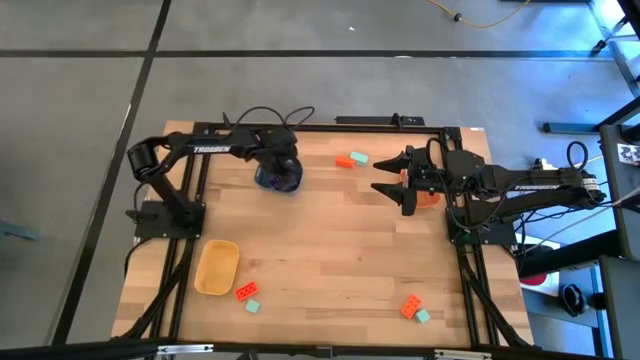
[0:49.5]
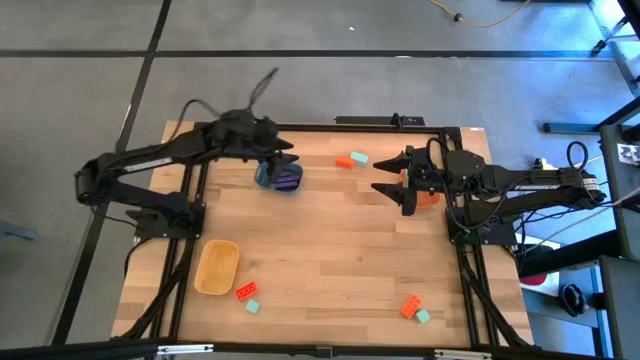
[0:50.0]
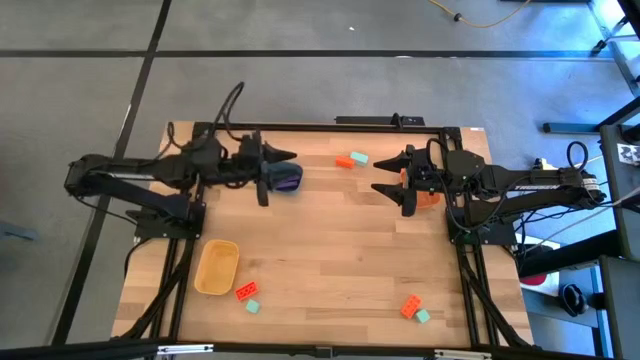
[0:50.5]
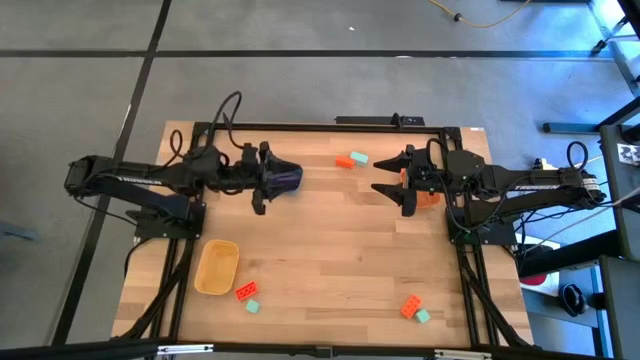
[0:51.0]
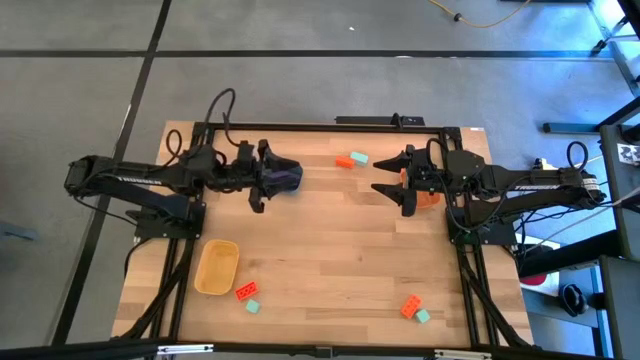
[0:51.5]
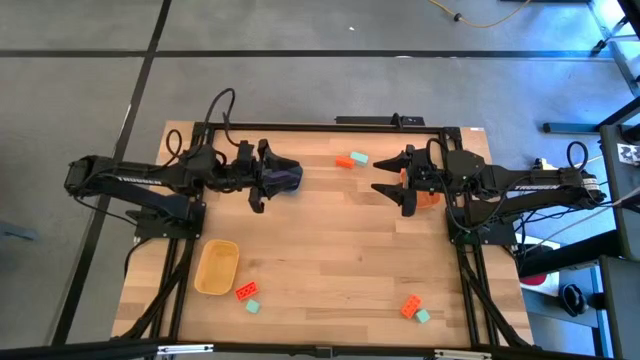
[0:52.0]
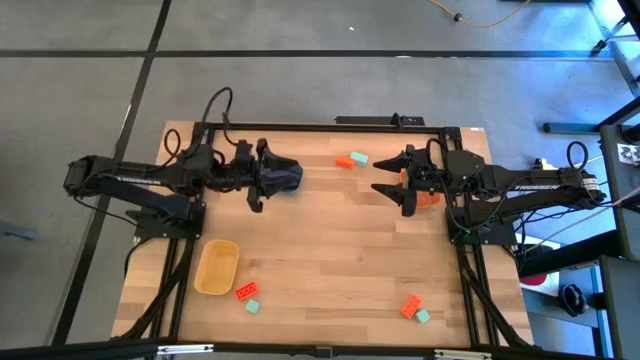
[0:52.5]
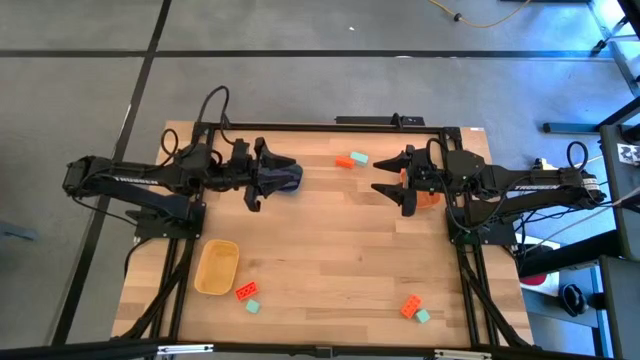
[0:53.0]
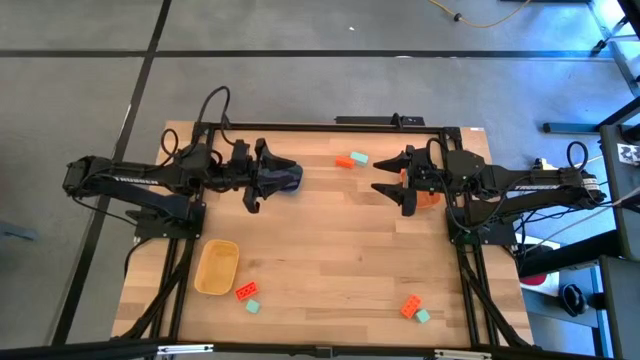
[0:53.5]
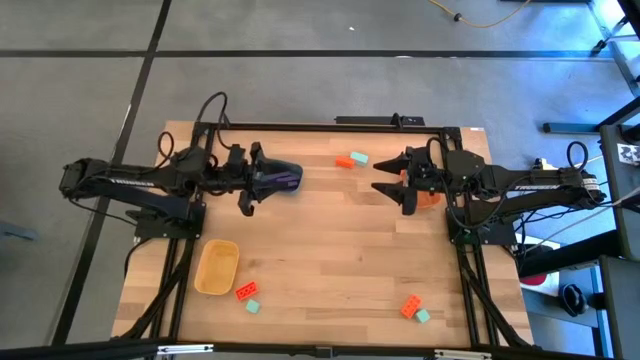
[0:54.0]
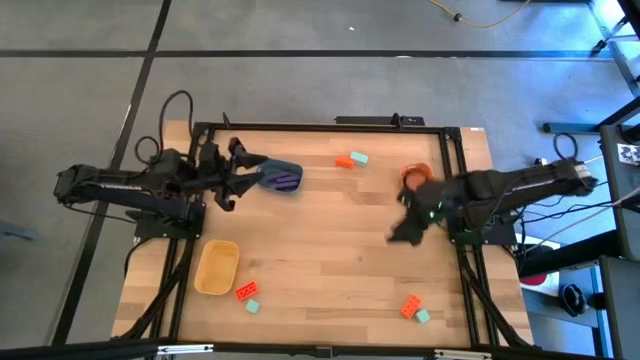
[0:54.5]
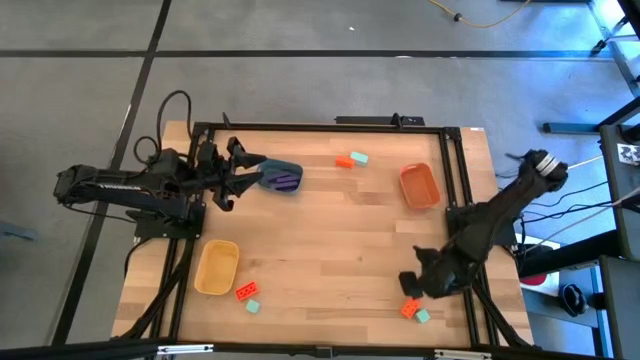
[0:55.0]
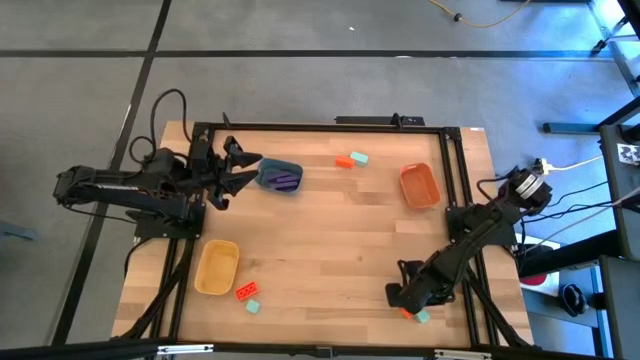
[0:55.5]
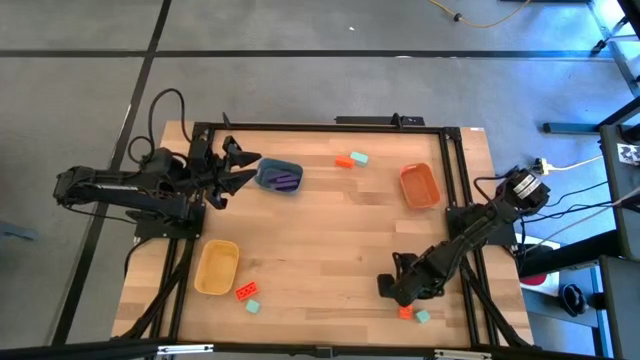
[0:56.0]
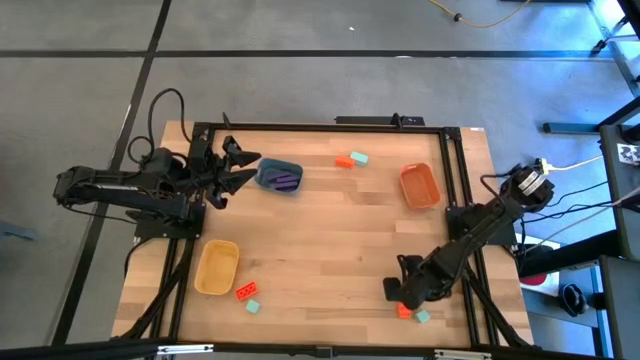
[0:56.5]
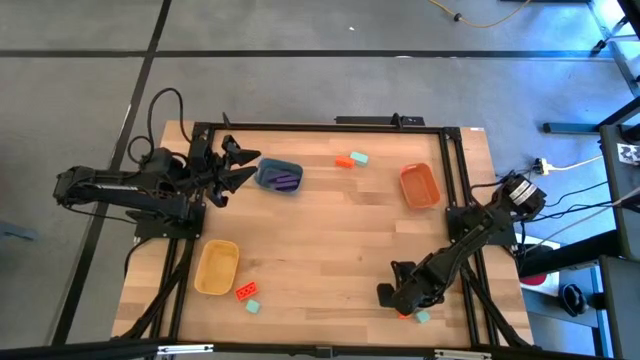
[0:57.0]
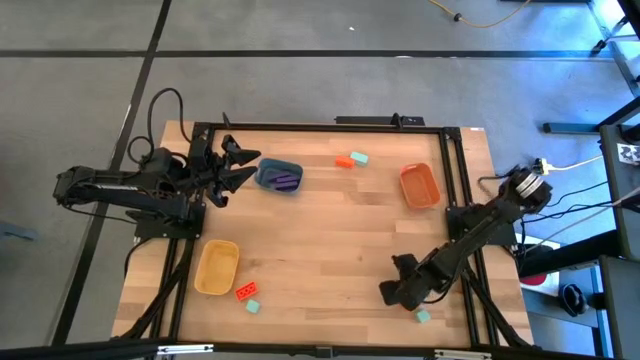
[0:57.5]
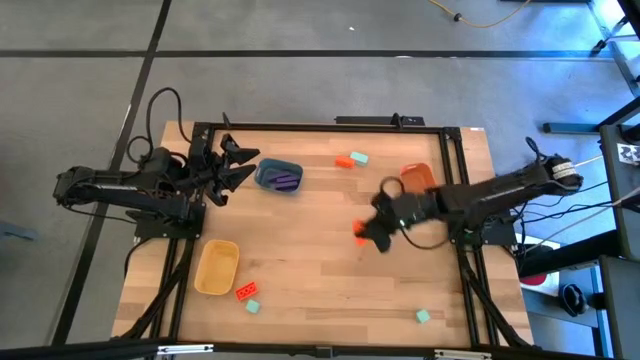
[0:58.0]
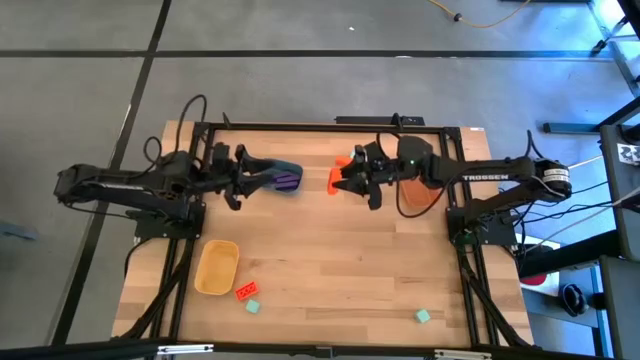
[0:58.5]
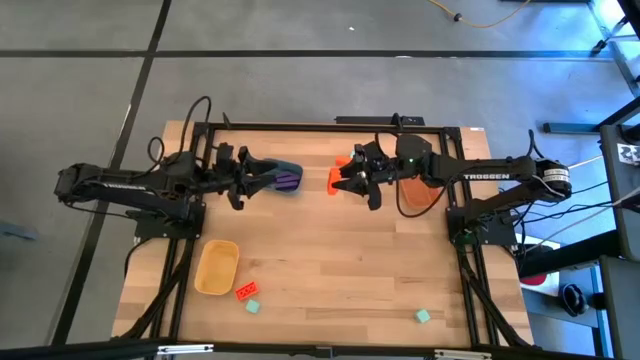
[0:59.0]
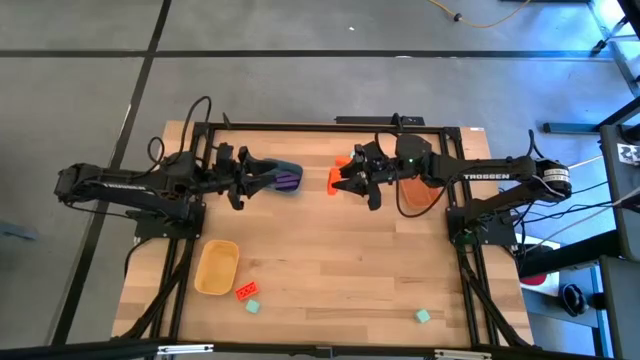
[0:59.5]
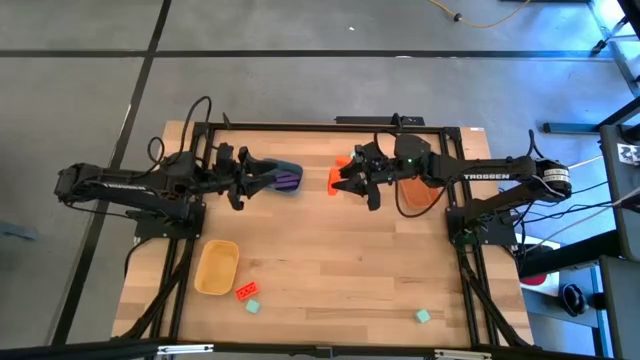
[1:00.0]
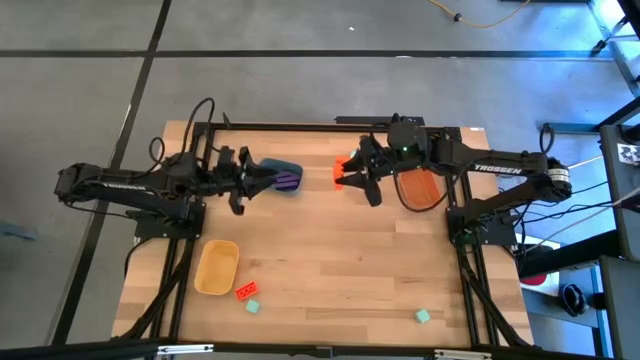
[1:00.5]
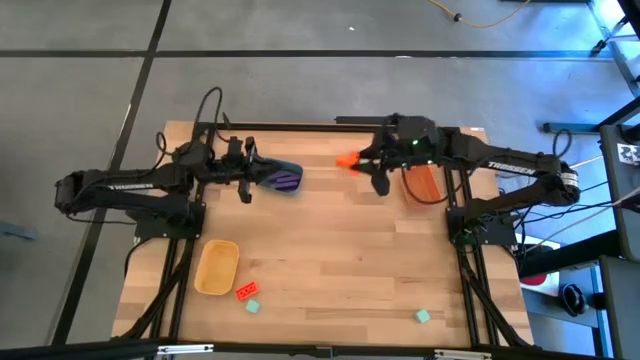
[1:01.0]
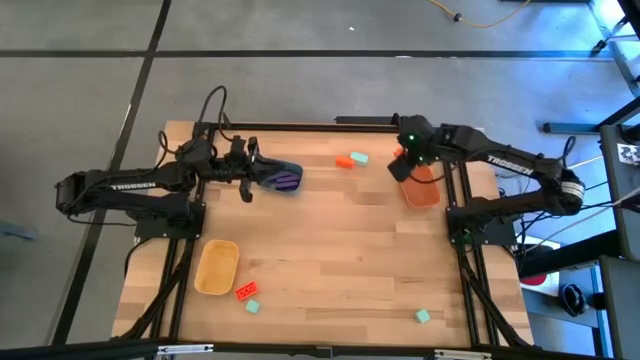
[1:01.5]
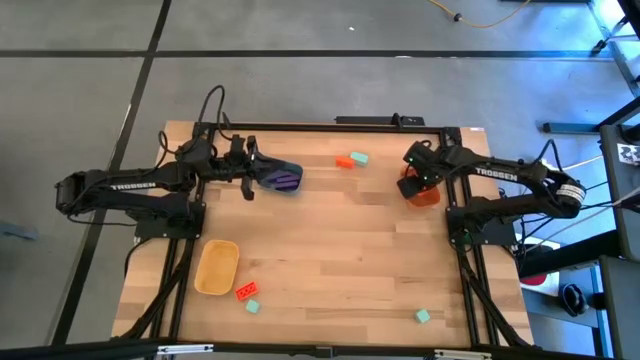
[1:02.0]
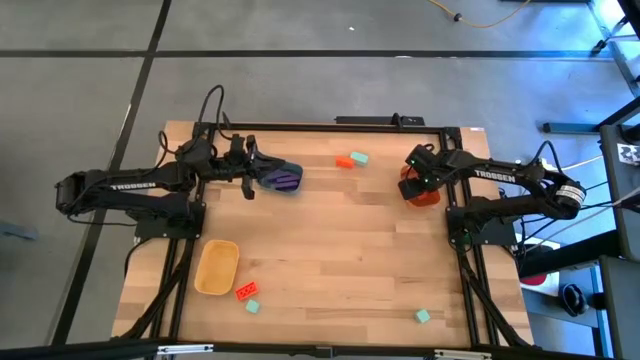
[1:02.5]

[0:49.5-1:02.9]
Task: Sort & place blocks by color
Put the right orange 8 stud game piece into the orange bin

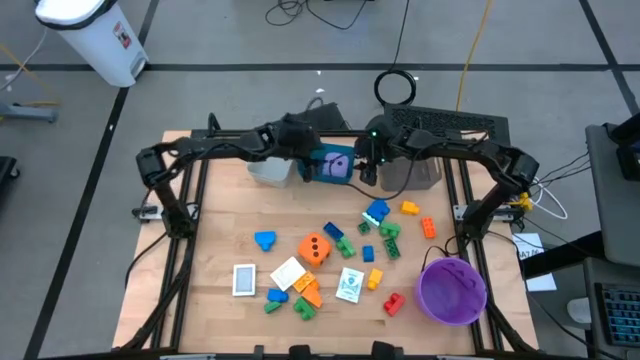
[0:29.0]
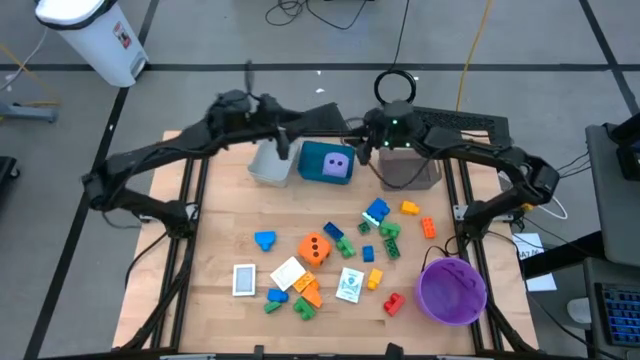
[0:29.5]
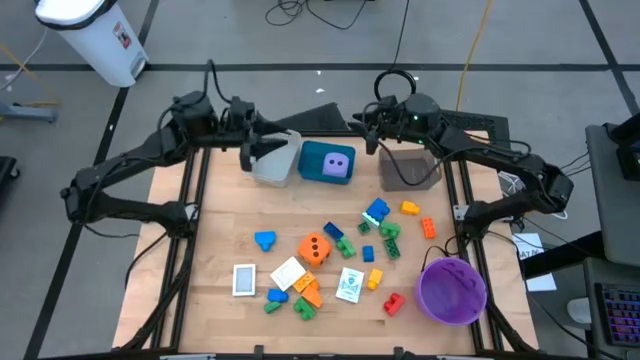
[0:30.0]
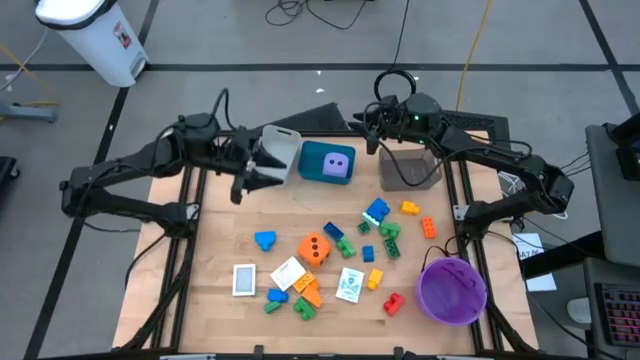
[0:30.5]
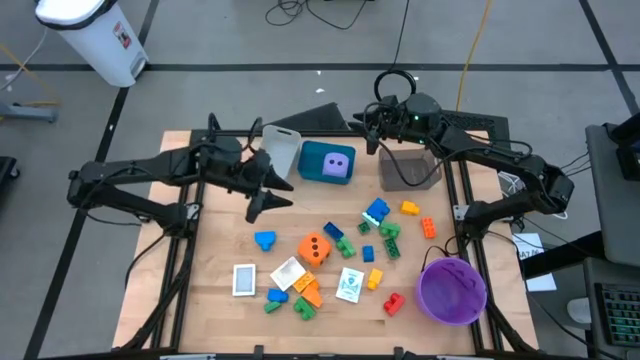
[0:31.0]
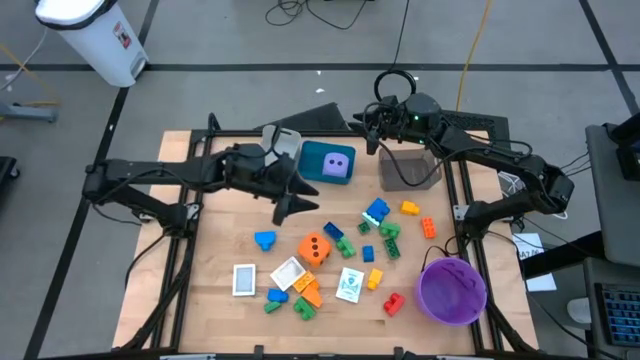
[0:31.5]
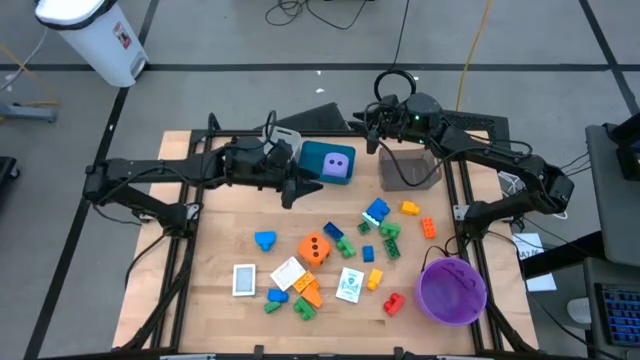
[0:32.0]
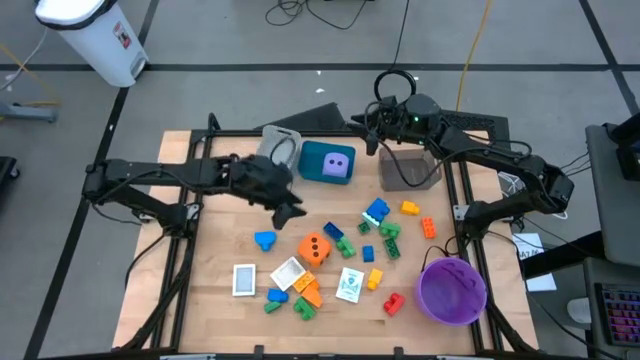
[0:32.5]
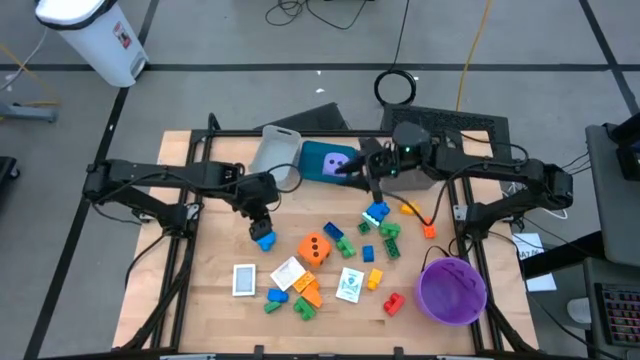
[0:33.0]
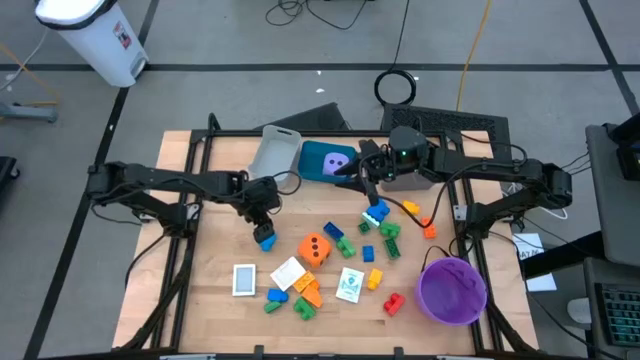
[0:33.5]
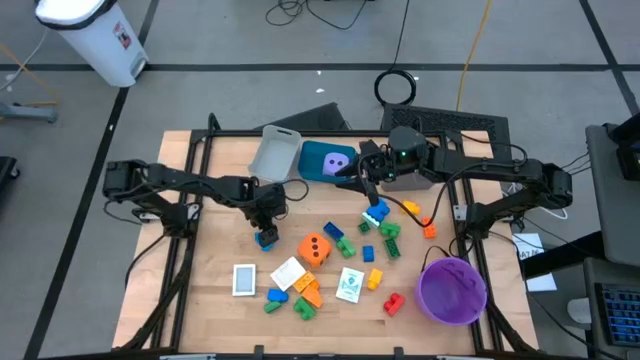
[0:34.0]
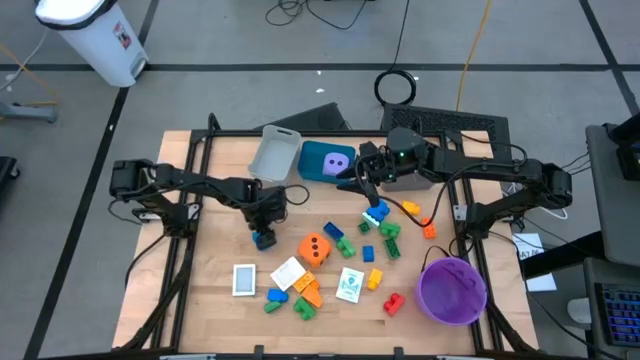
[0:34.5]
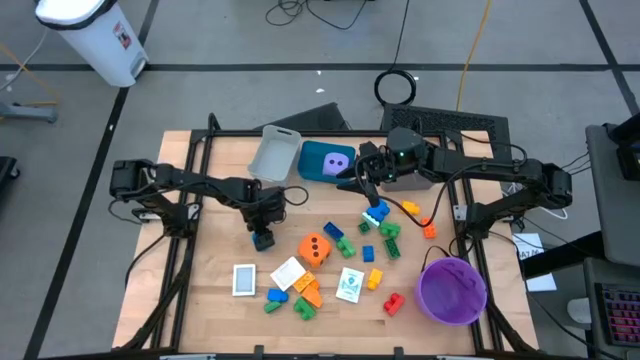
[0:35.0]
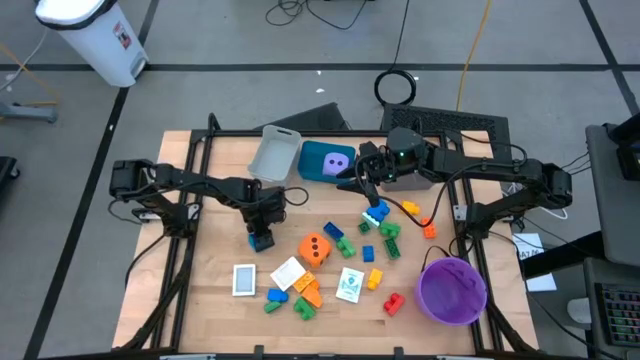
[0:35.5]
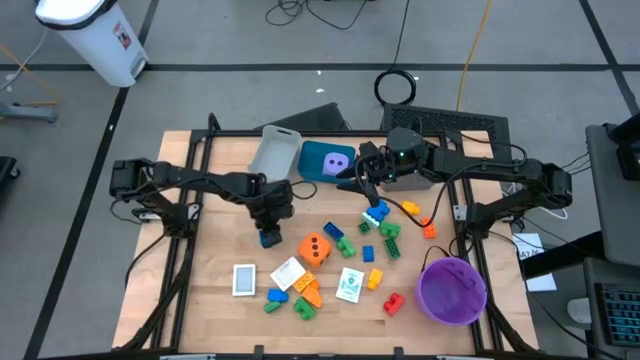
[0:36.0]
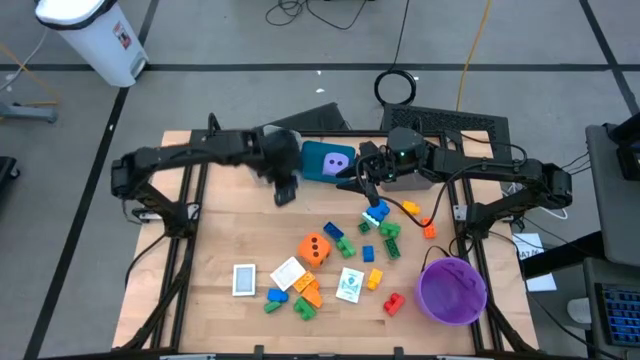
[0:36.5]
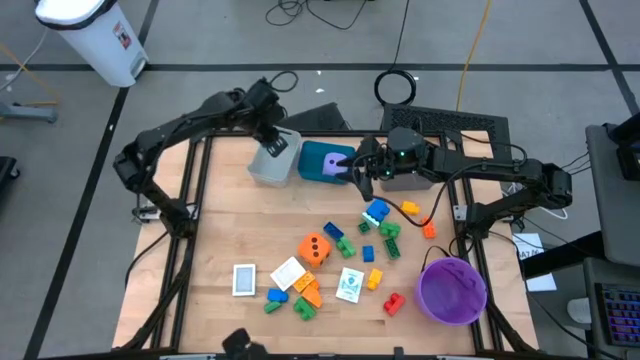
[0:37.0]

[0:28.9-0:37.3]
Task: Pick & Place Toys
Put the blue game piece into the gray bin
